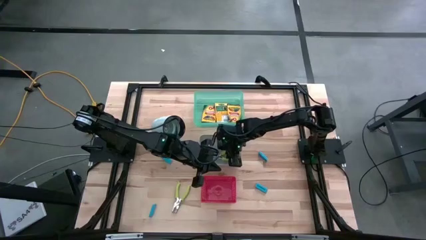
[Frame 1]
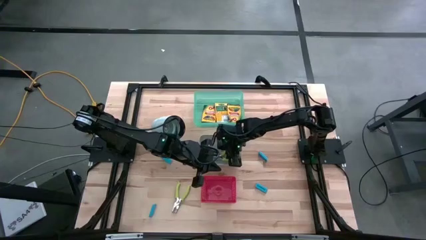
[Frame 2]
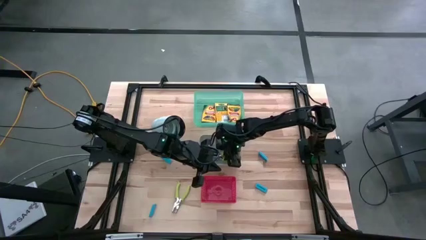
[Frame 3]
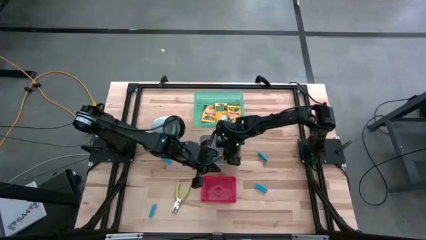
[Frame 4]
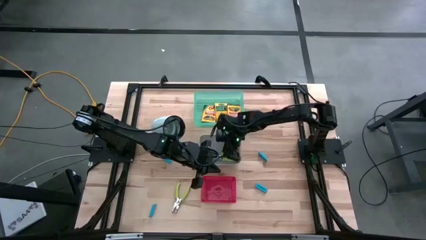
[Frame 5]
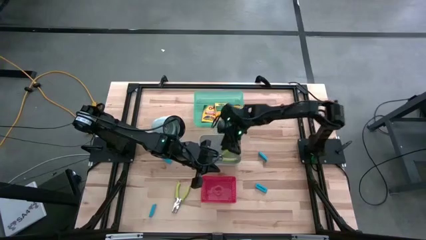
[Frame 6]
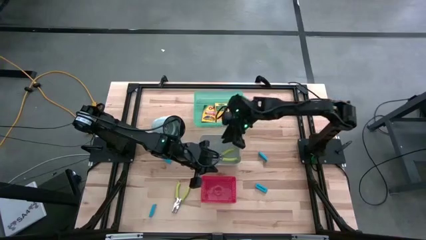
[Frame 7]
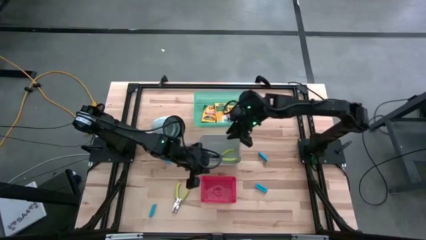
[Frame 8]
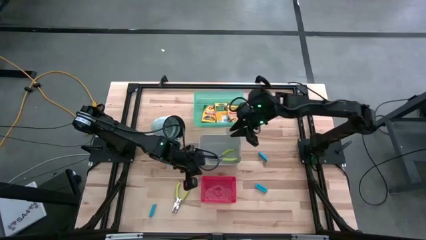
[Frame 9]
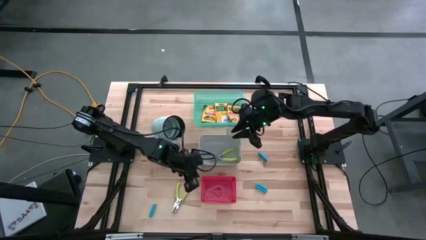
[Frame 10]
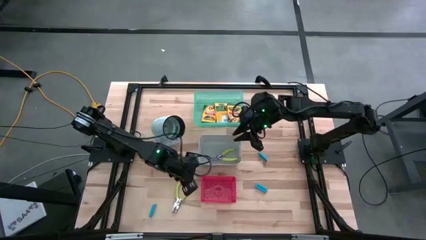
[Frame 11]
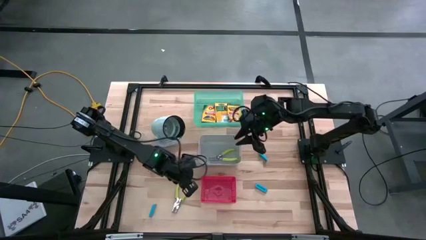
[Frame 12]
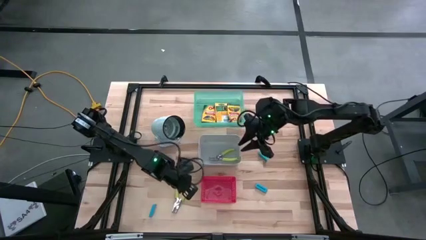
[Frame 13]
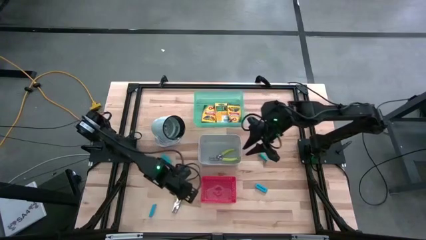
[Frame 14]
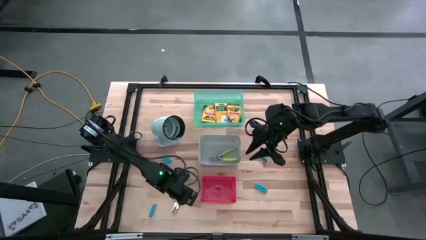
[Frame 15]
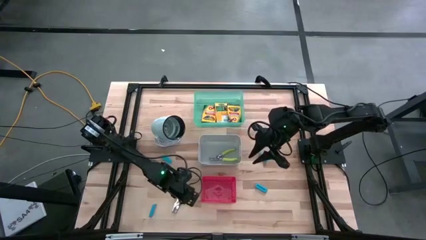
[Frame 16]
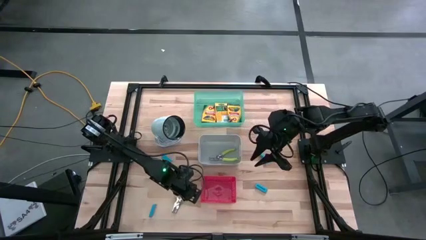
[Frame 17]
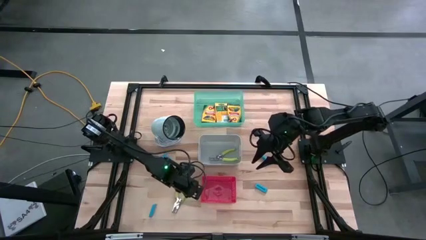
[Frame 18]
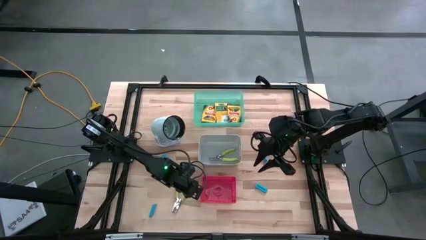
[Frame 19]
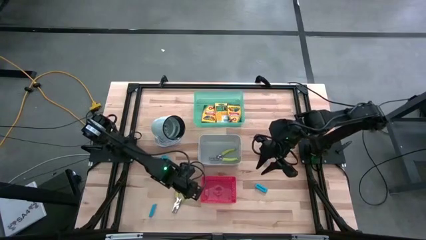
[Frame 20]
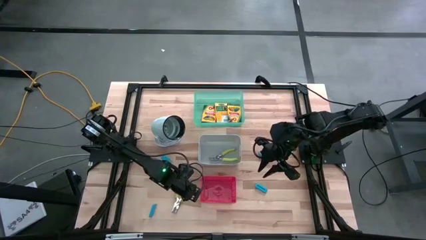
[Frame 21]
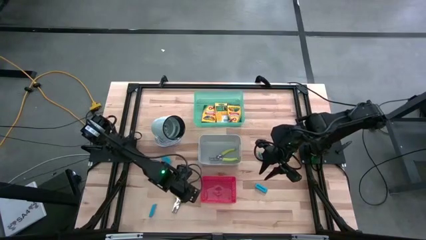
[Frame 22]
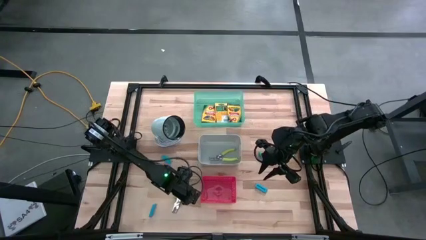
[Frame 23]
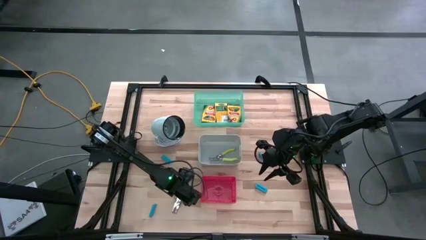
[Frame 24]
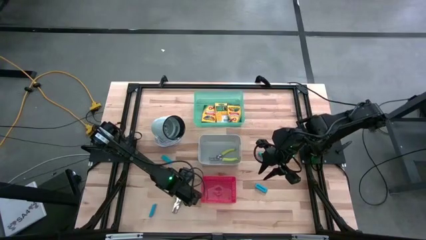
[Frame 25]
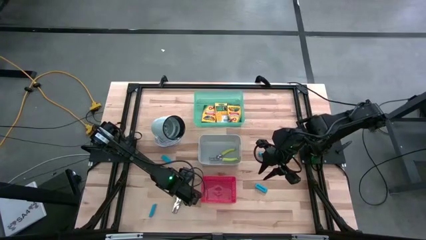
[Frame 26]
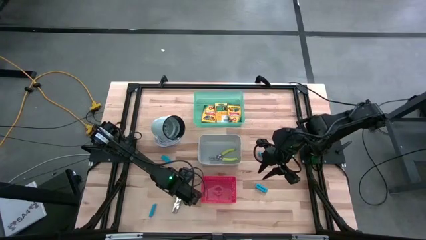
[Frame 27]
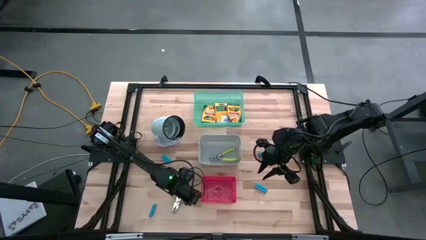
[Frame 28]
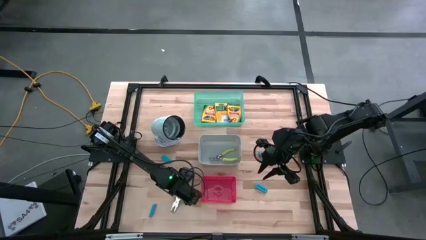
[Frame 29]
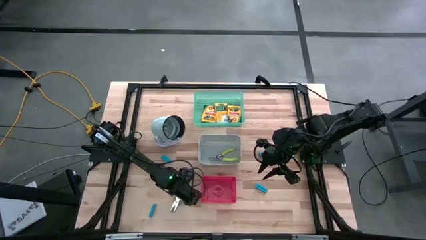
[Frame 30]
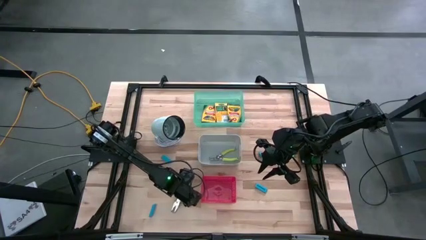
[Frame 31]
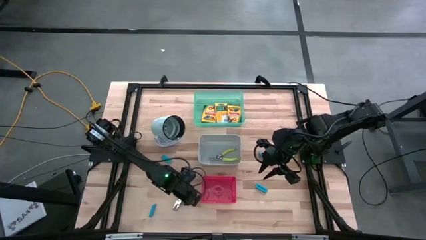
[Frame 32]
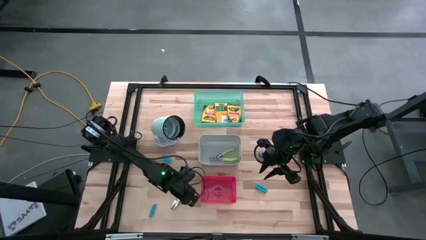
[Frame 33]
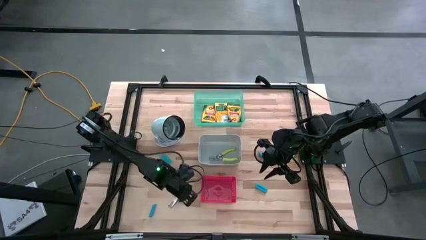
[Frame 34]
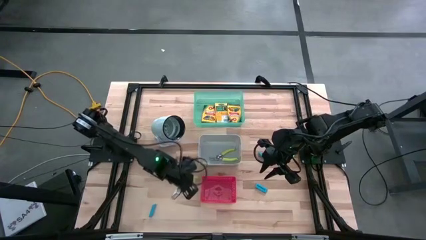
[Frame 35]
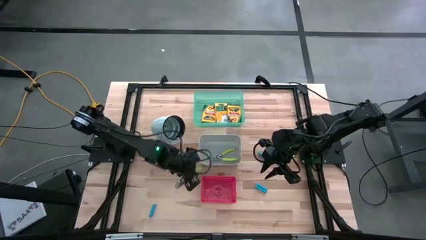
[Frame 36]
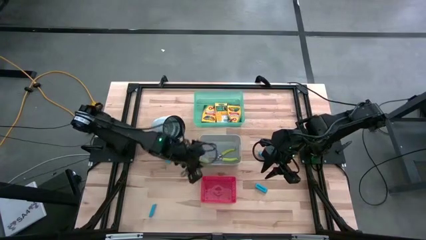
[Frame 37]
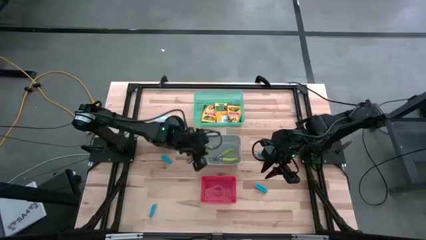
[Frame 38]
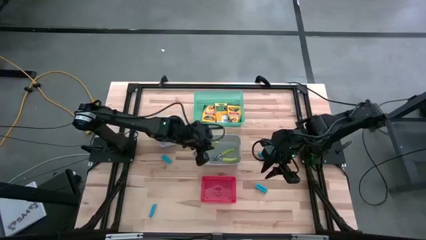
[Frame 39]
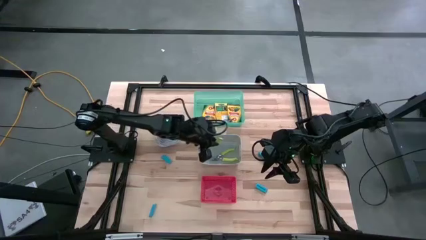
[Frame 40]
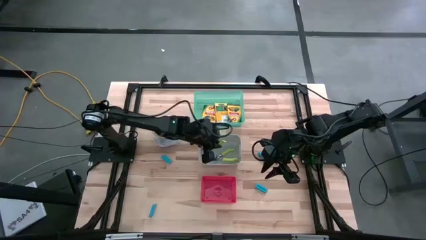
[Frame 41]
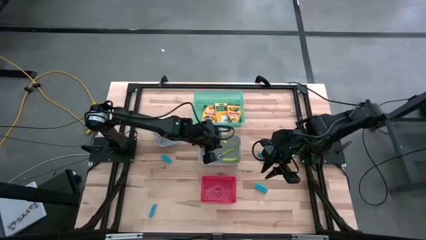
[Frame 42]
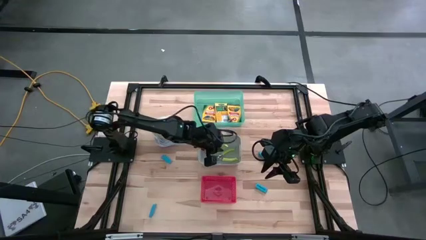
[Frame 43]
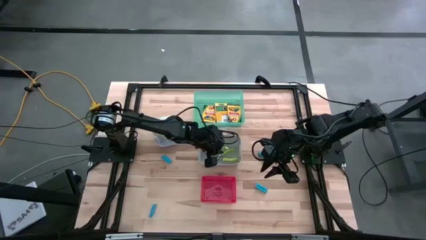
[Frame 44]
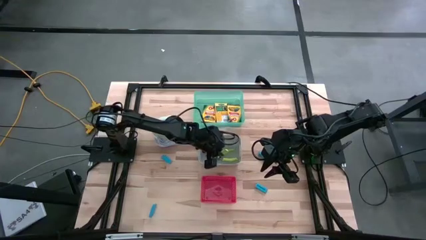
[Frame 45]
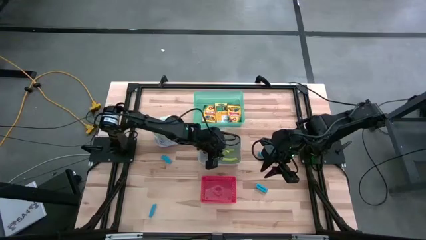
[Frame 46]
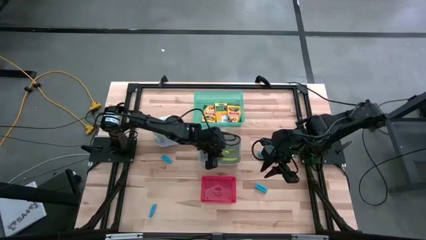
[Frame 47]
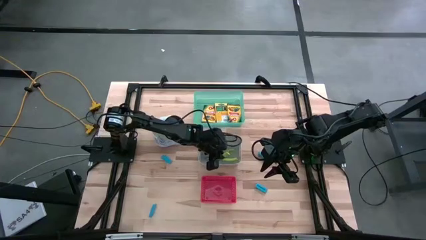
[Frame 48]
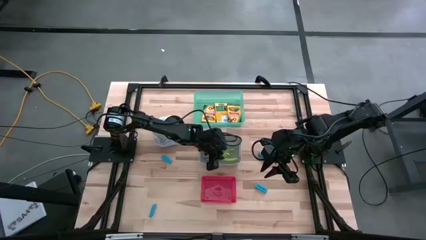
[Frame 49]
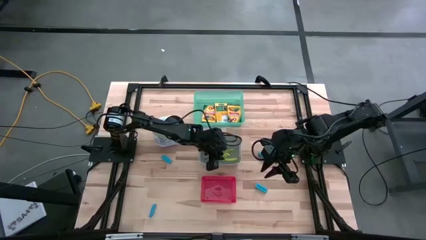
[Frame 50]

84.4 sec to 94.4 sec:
Task: Pick & Place School Supplies
Put the green hole puncher into the gray bin

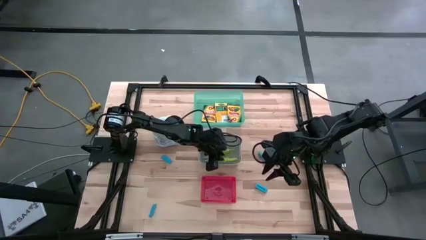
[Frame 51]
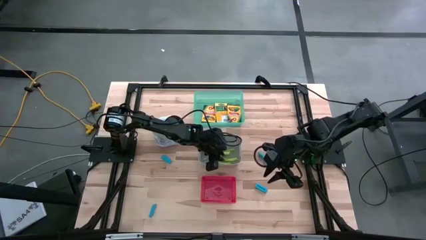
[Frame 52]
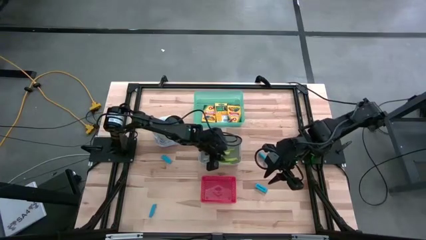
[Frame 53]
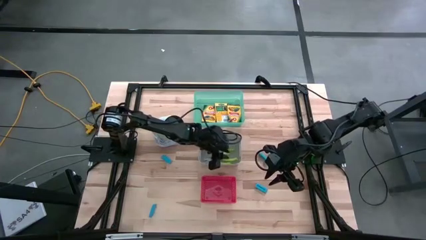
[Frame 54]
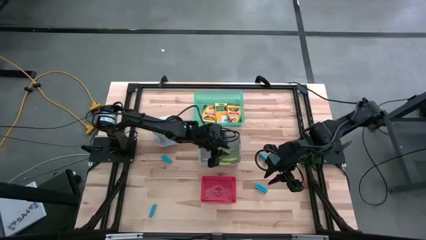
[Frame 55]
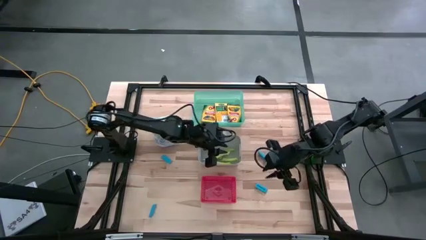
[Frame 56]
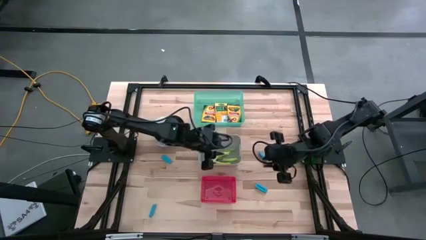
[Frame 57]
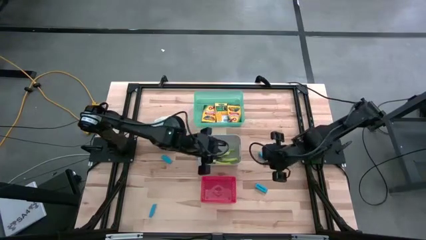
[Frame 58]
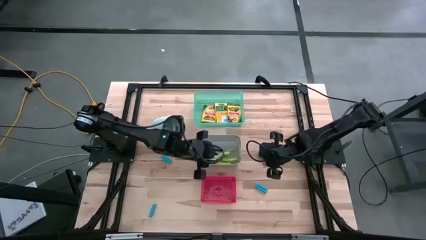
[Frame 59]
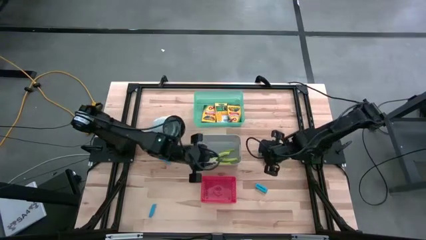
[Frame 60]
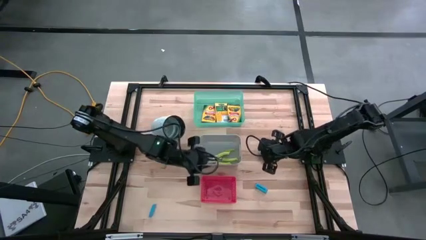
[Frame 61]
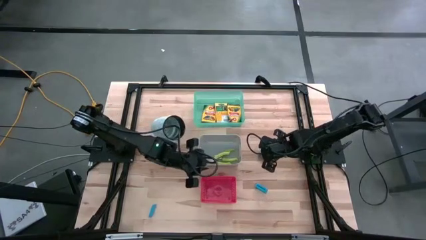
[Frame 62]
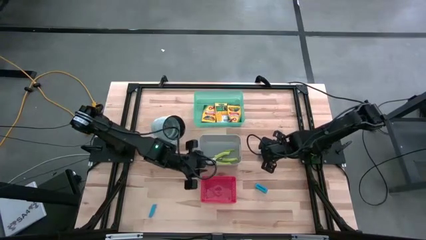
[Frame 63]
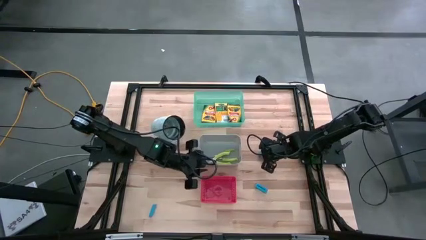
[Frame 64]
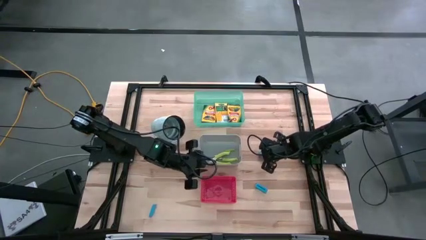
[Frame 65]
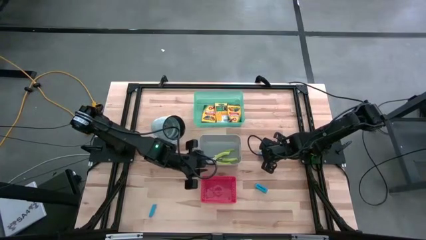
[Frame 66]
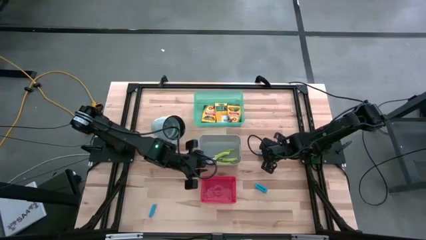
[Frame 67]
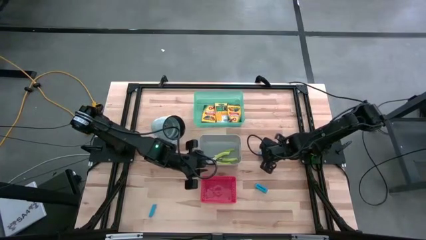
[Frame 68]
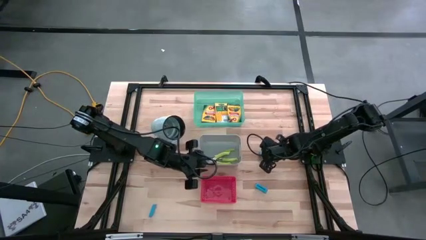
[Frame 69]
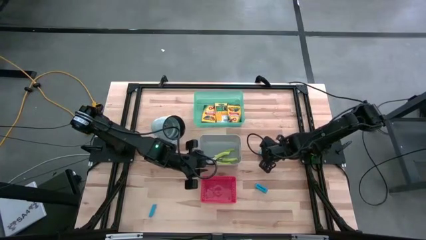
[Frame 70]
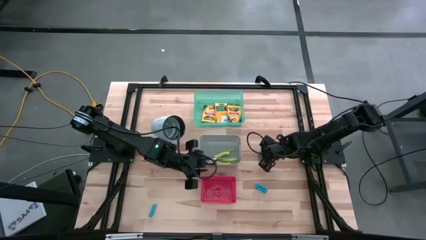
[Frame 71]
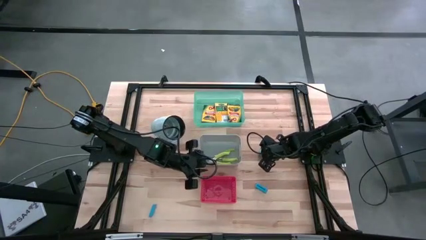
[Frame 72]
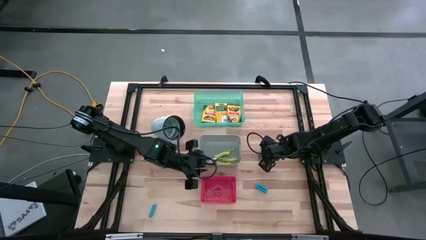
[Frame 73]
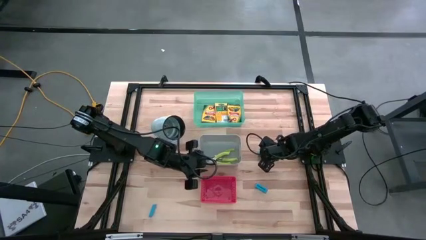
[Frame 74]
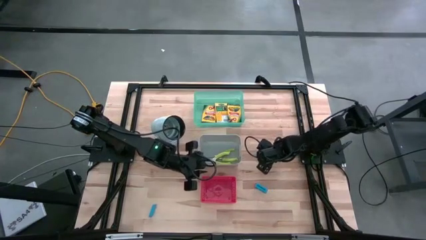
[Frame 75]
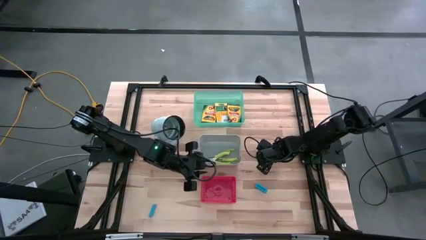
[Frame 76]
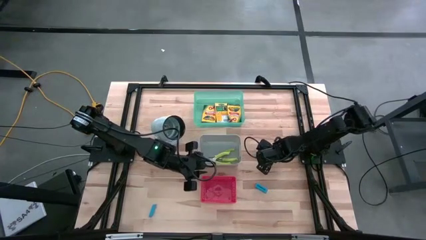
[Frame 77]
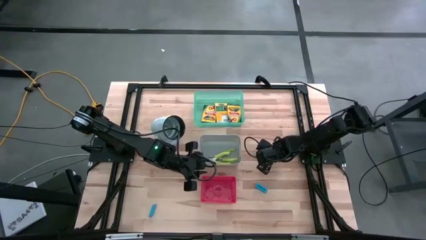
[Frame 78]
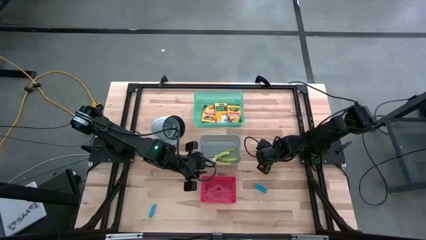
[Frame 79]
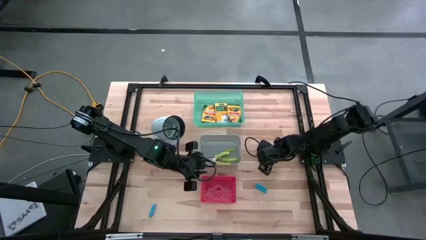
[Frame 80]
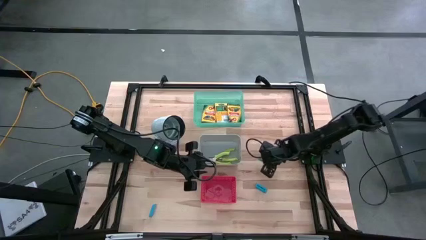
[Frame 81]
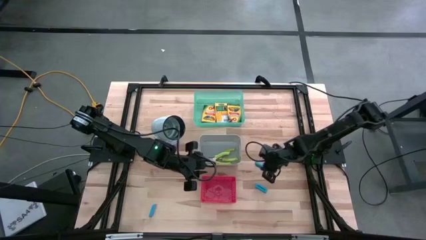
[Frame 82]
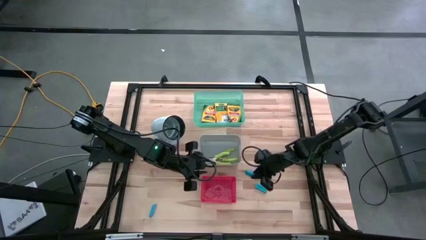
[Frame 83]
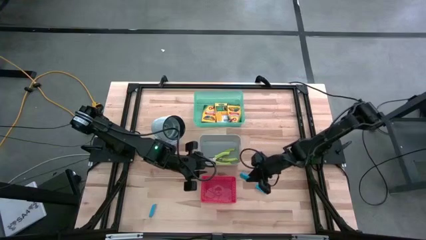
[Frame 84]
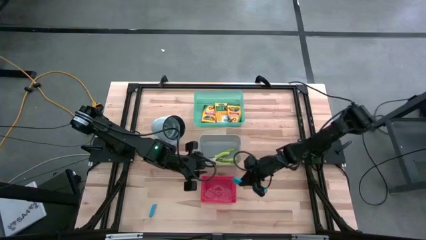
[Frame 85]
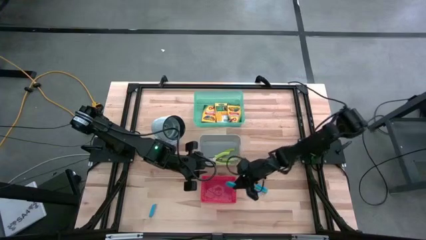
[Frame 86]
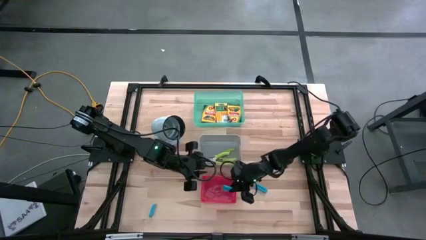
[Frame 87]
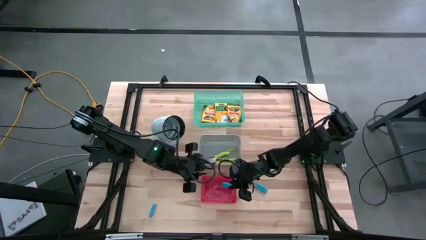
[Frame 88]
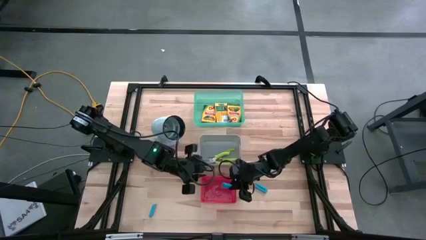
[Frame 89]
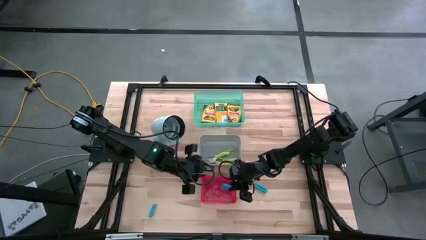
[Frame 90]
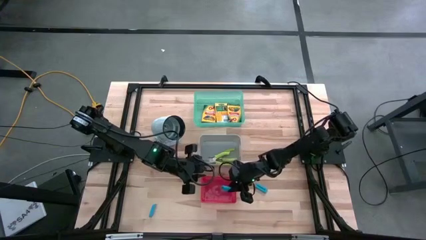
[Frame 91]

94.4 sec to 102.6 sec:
Put the blue eraser into the red bin
